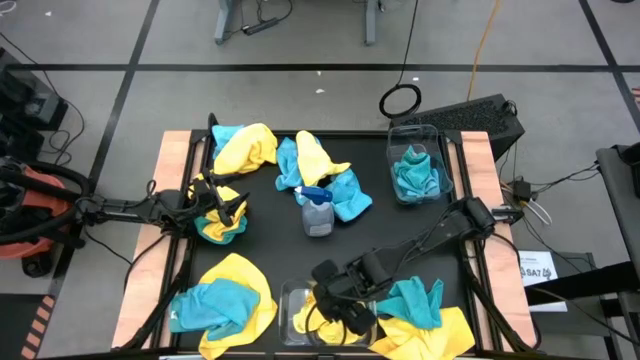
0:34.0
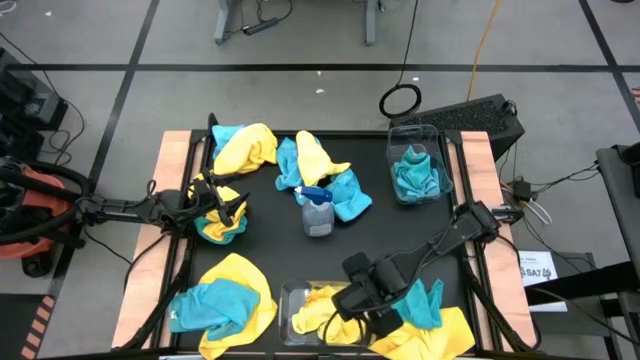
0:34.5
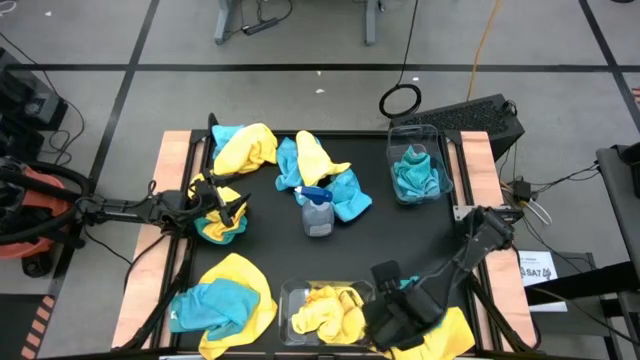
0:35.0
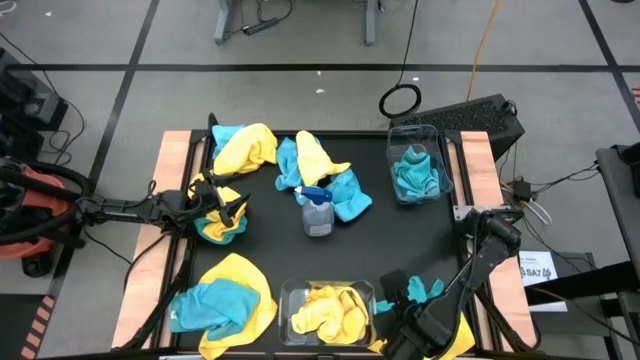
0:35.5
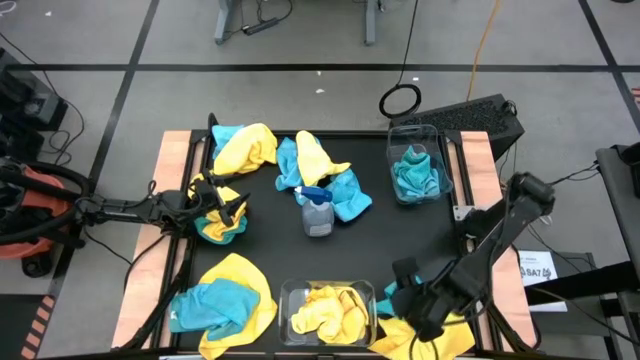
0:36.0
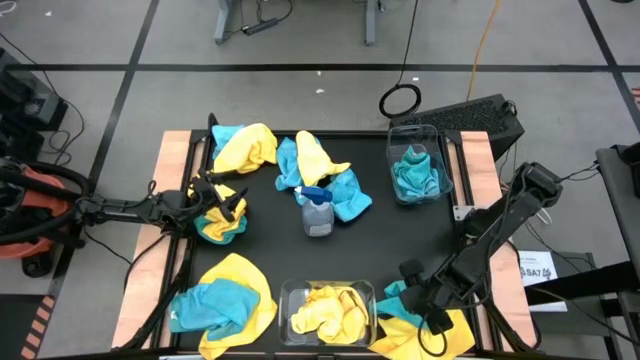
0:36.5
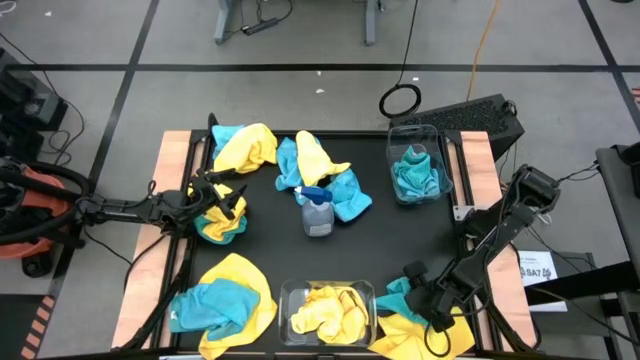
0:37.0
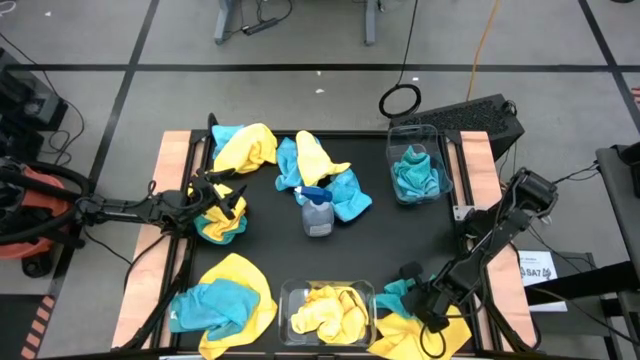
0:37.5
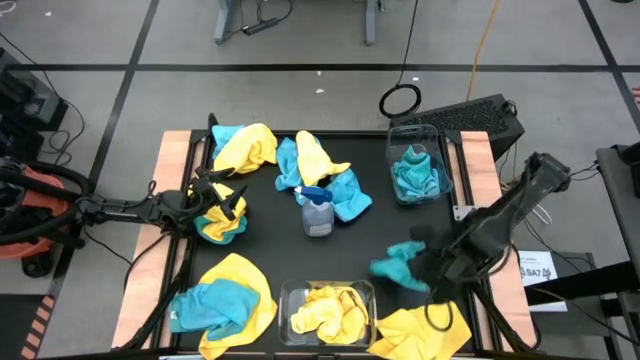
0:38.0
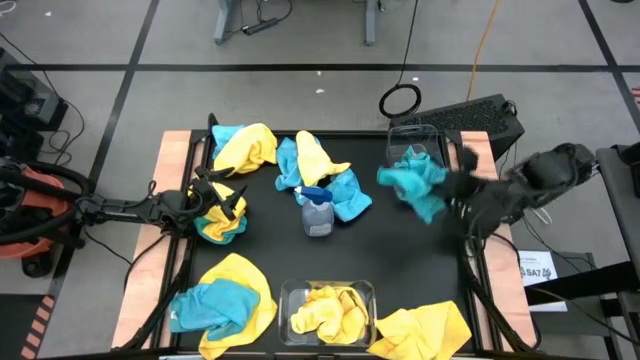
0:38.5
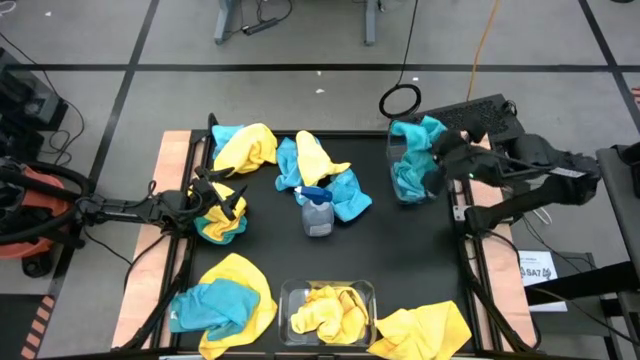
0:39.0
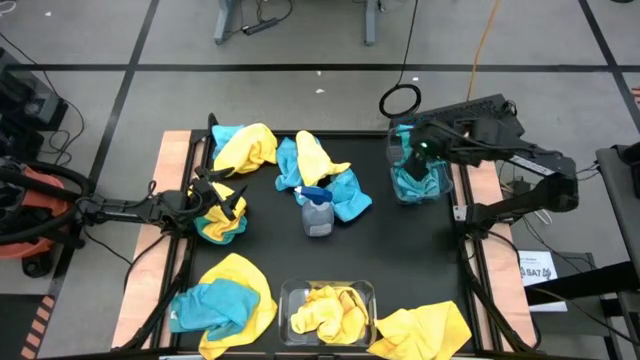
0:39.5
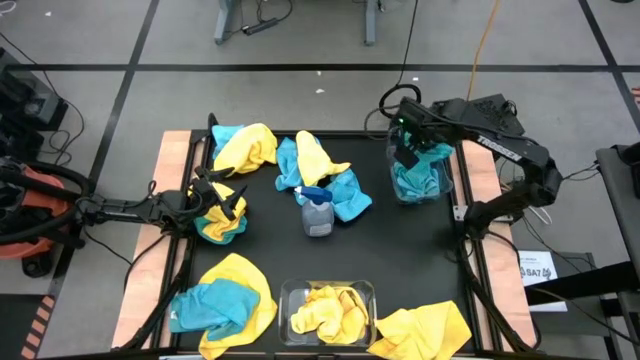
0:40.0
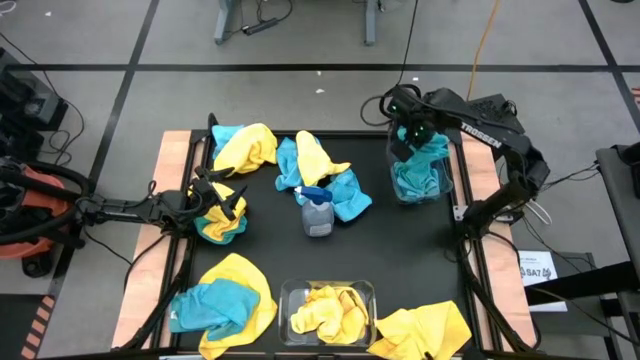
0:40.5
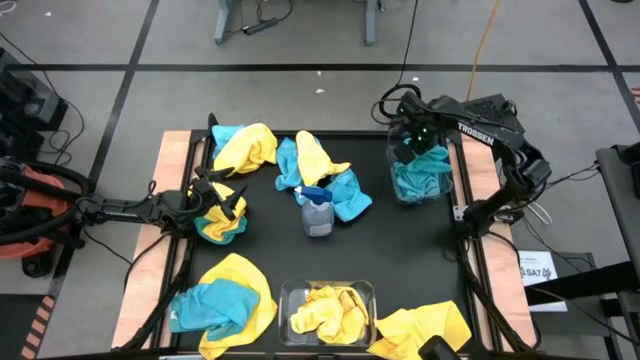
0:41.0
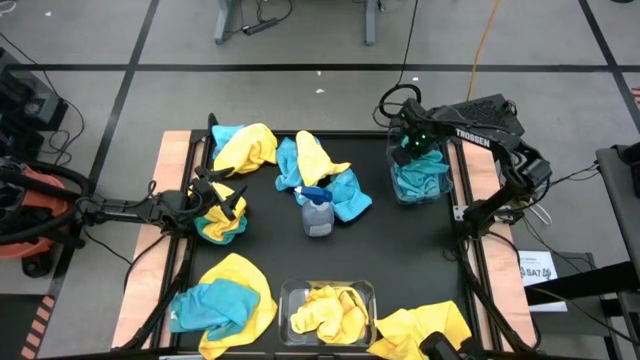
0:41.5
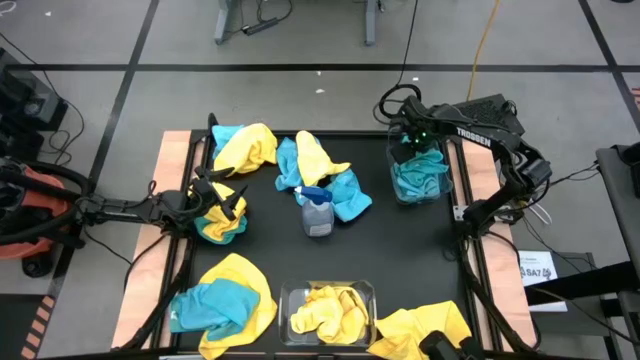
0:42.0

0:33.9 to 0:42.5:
Task: Sort microfiber towel by color & place in baskets
Put the blue towel into the top transparent bin

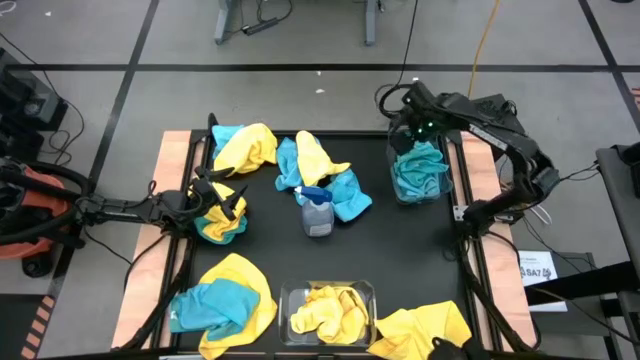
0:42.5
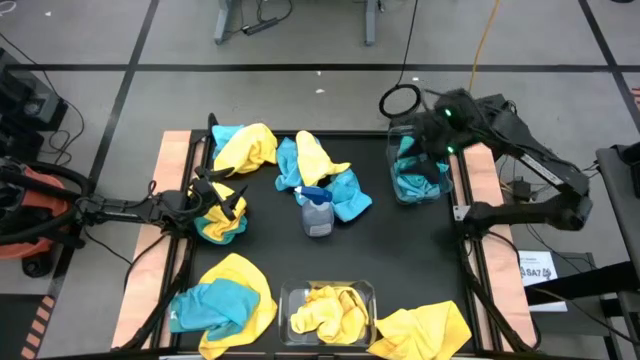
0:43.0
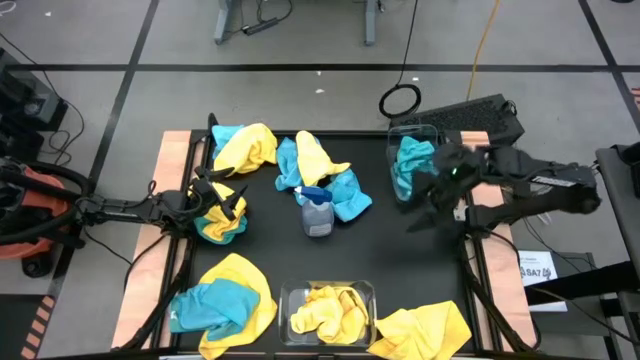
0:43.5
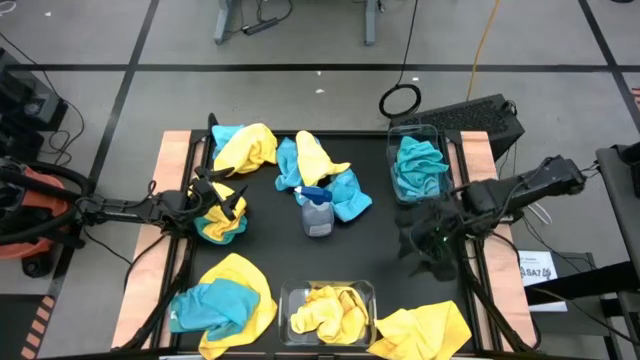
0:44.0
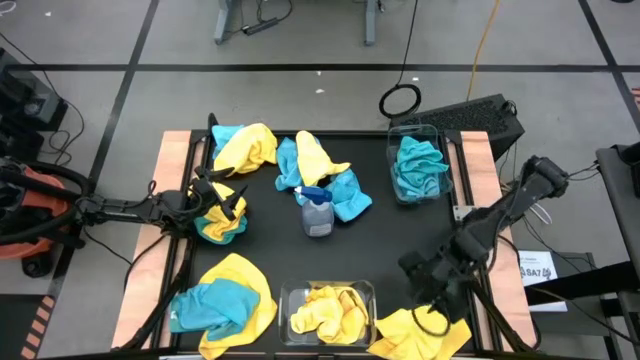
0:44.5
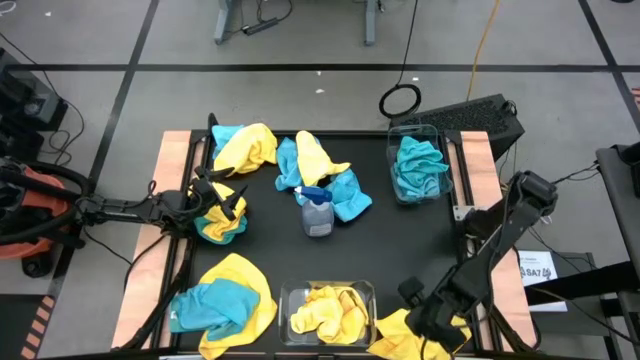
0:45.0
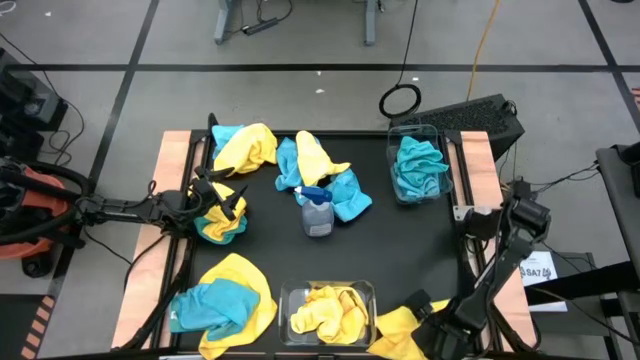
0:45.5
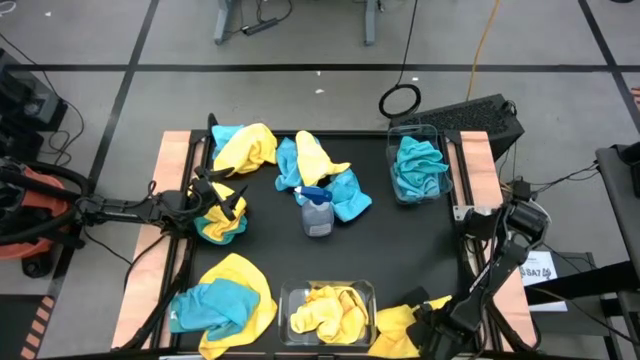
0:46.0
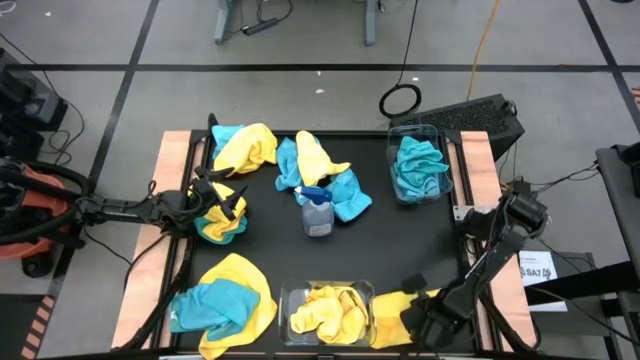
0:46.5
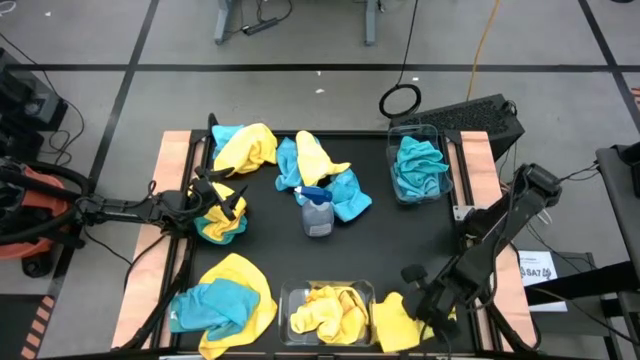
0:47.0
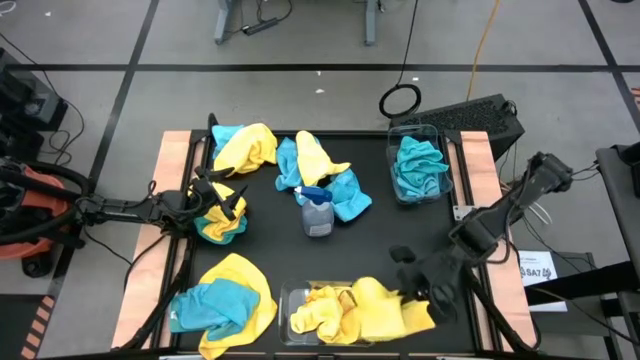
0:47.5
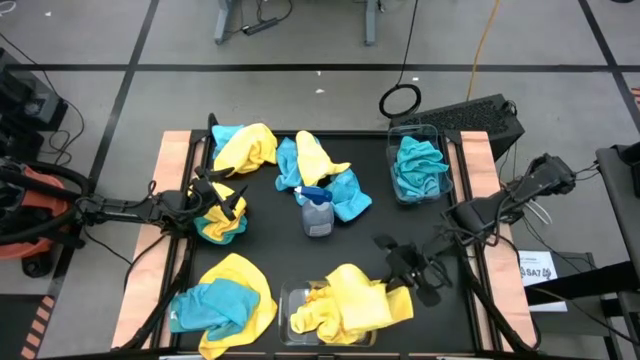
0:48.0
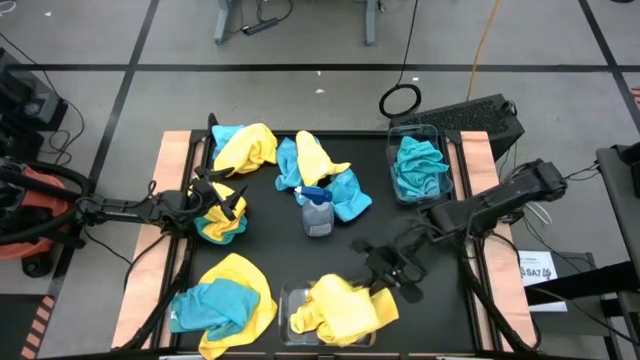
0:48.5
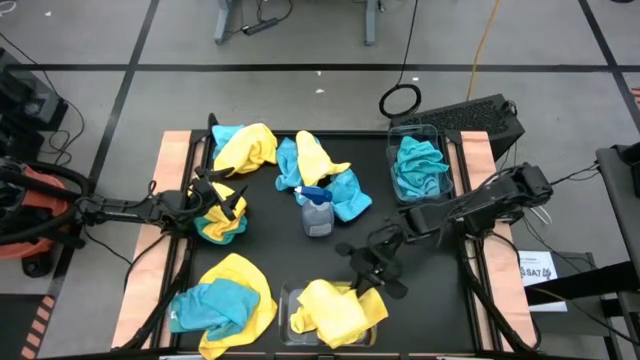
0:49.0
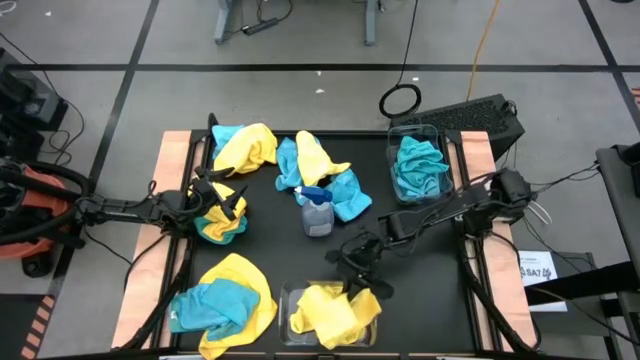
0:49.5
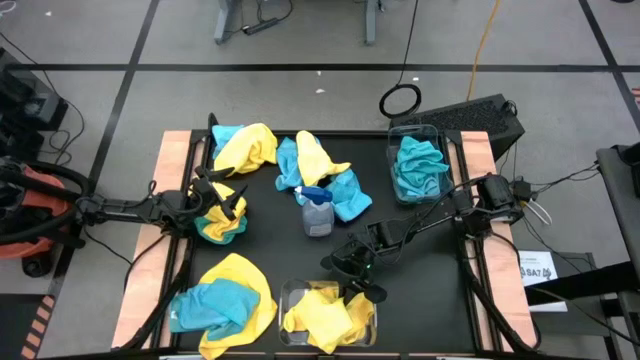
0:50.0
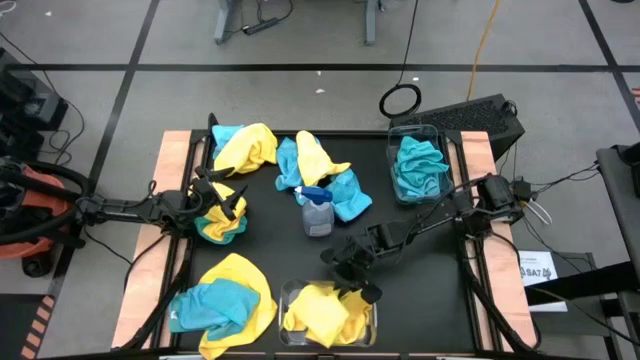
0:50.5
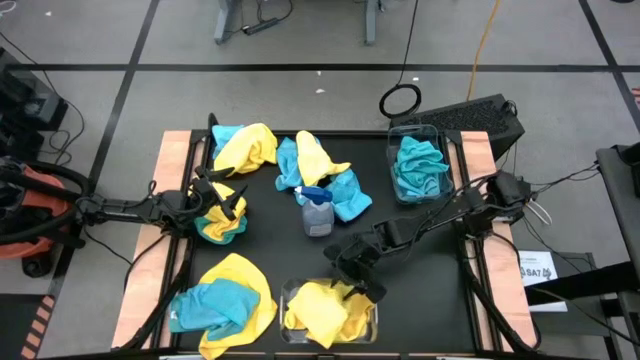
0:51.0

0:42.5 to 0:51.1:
Put the yellow towel into the bottom transparent bin

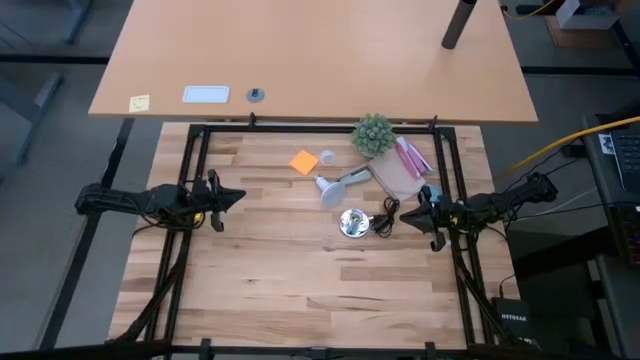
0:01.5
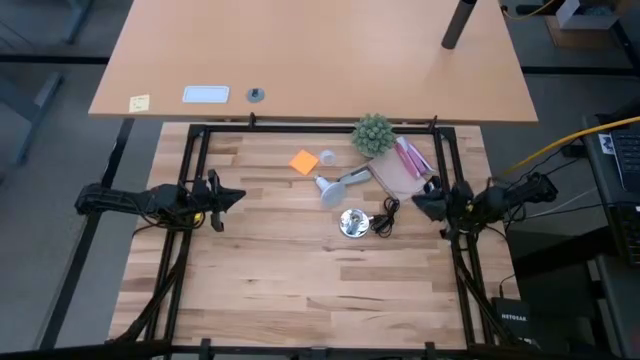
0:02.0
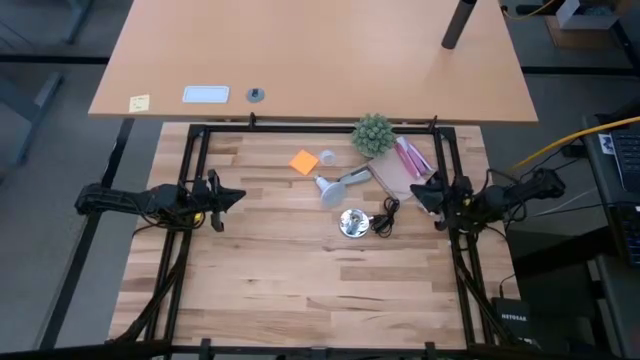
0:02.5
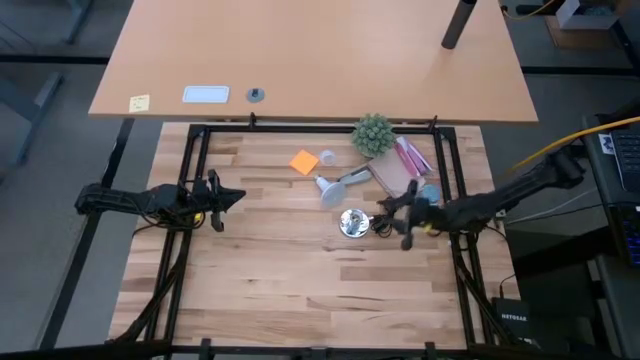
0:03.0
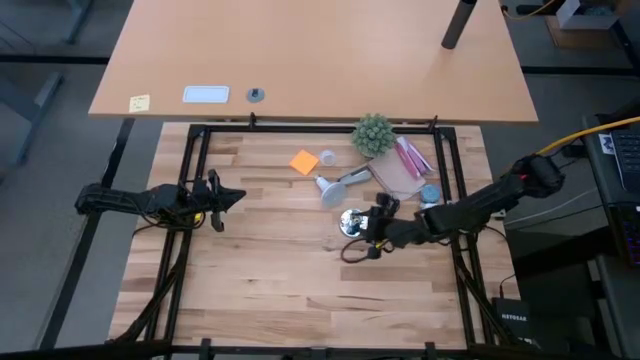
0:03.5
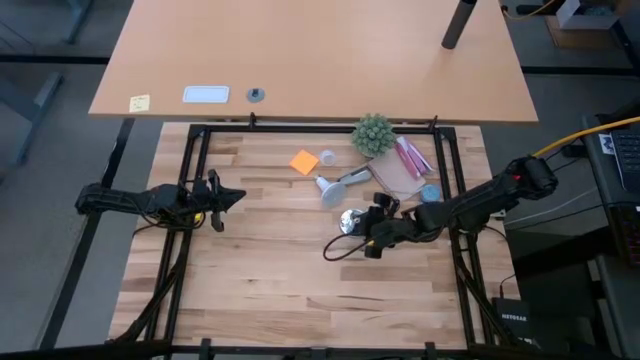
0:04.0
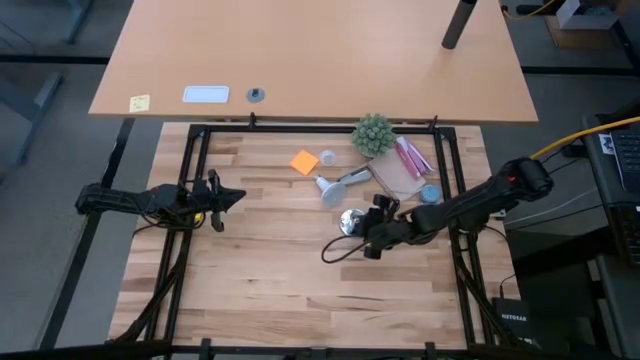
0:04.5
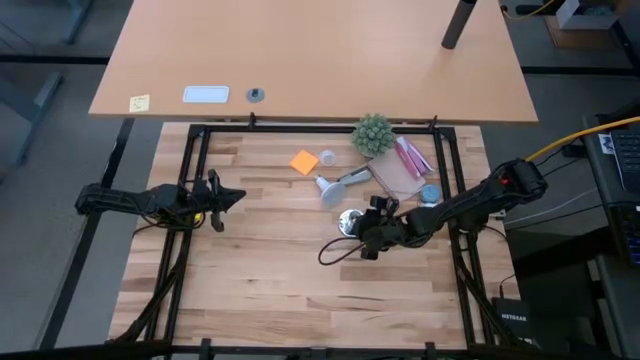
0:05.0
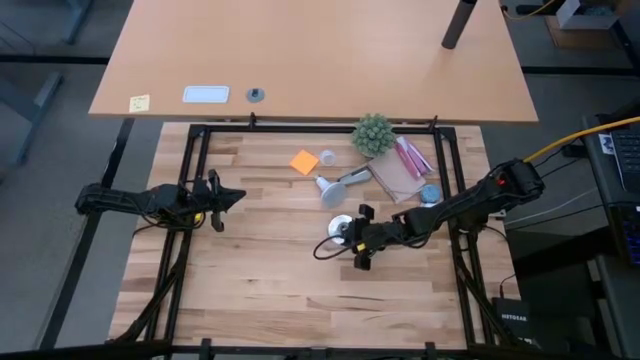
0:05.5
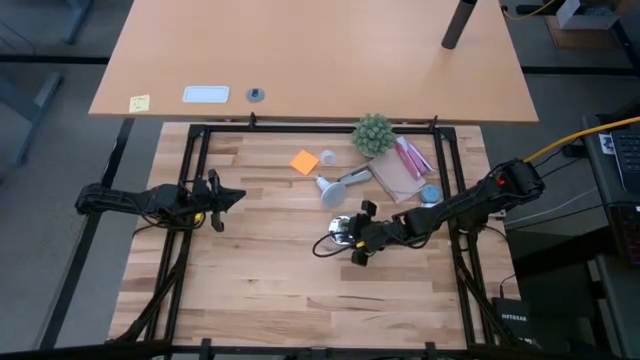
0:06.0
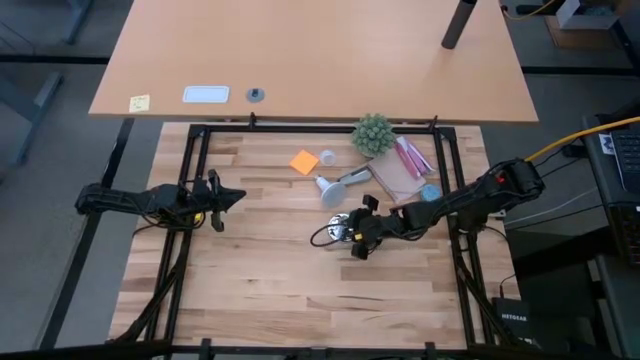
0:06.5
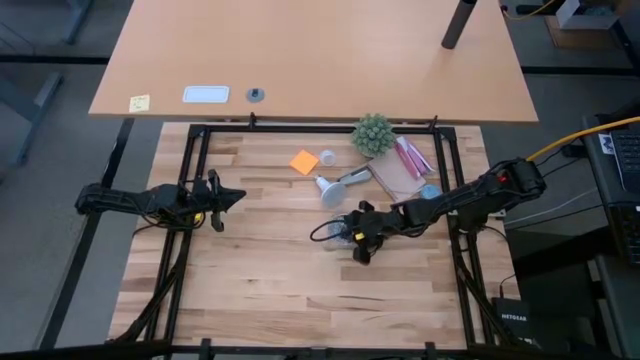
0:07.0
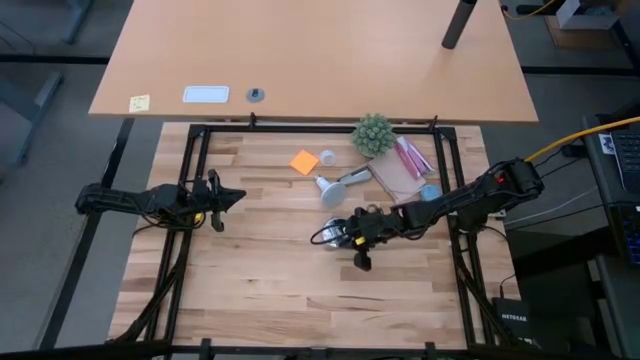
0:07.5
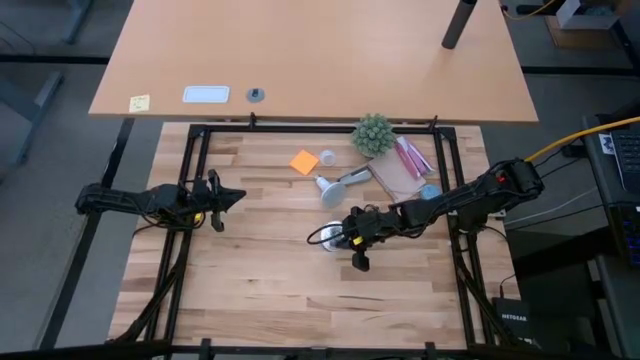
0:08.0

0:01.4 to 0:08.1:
Task: Screw lightbulb
Move the silver lamp to the center of the table
